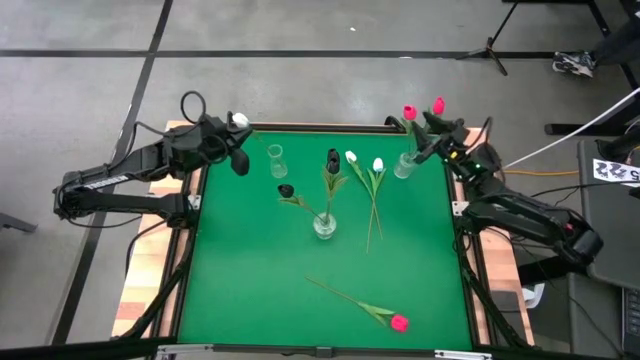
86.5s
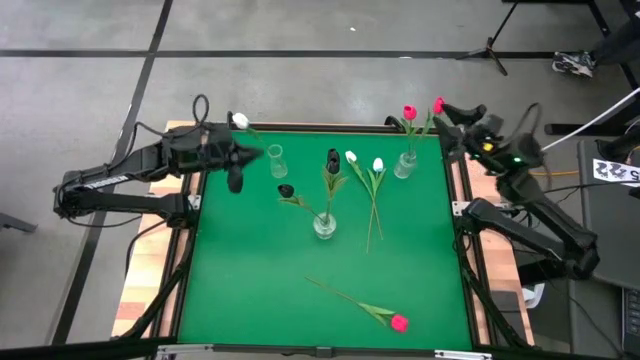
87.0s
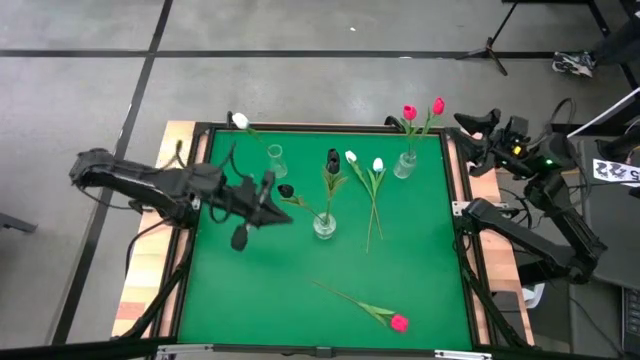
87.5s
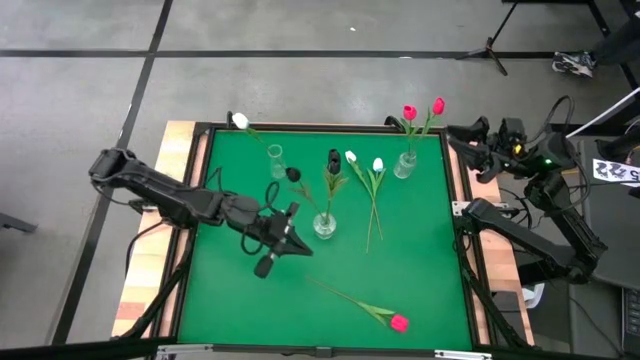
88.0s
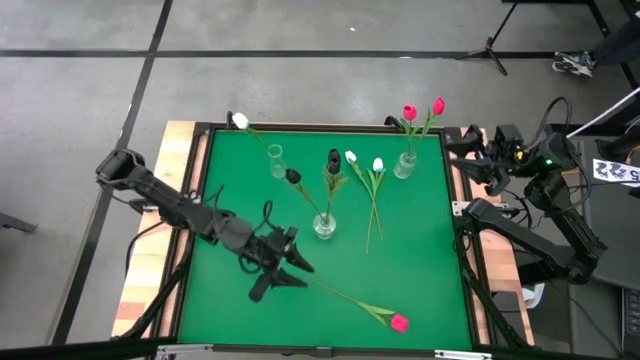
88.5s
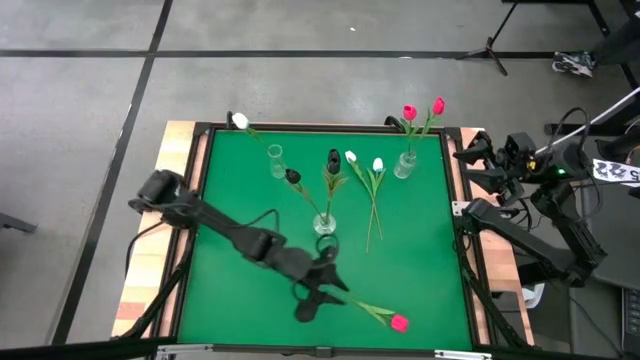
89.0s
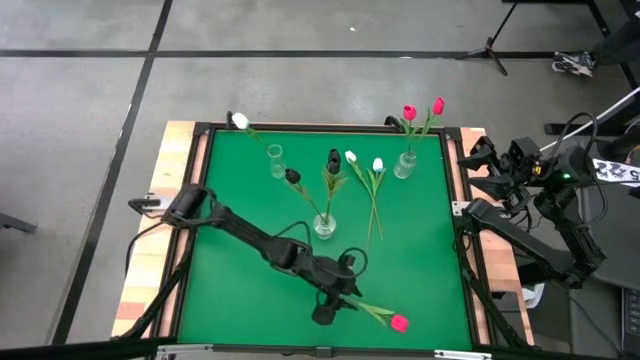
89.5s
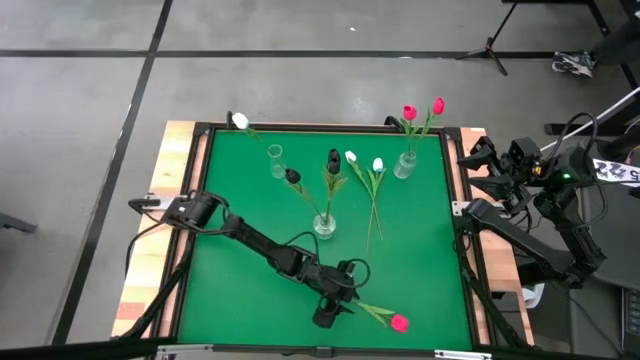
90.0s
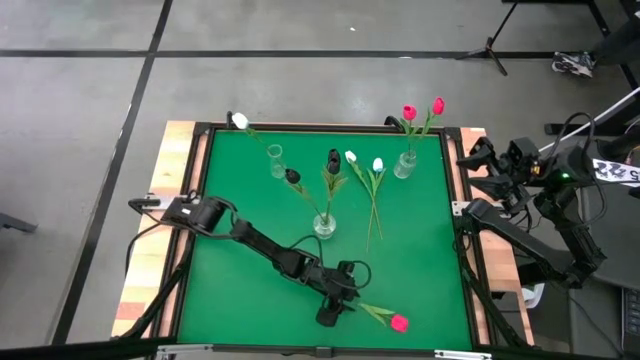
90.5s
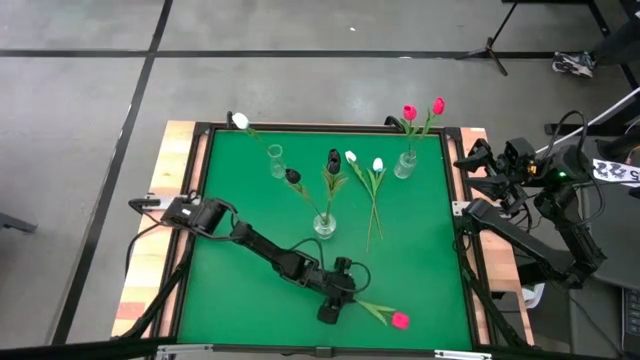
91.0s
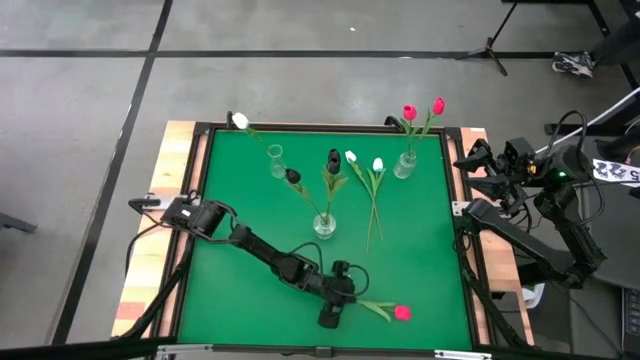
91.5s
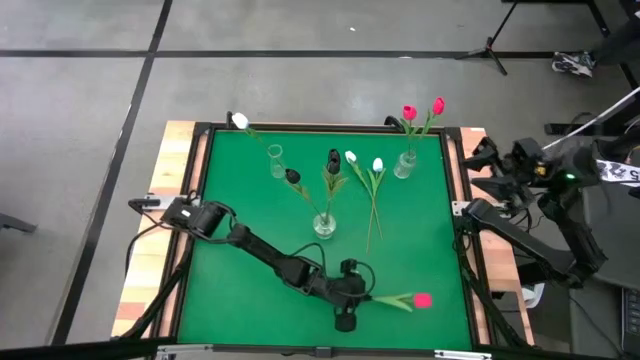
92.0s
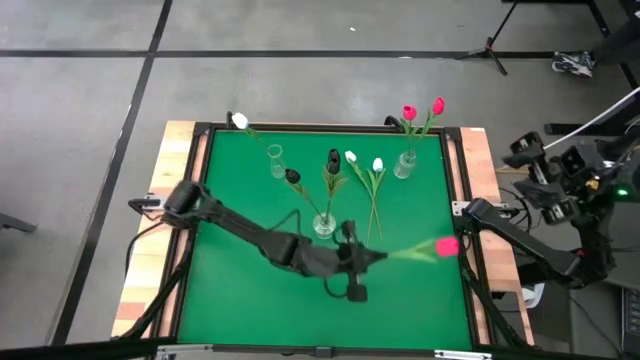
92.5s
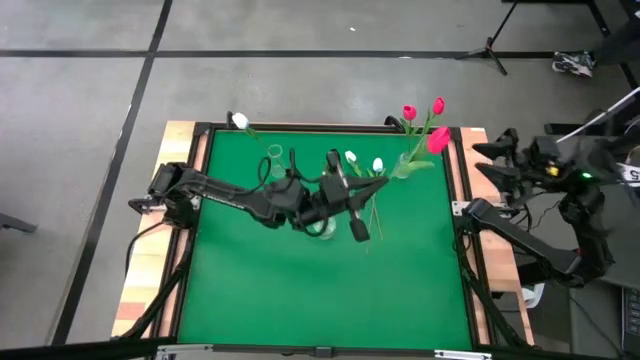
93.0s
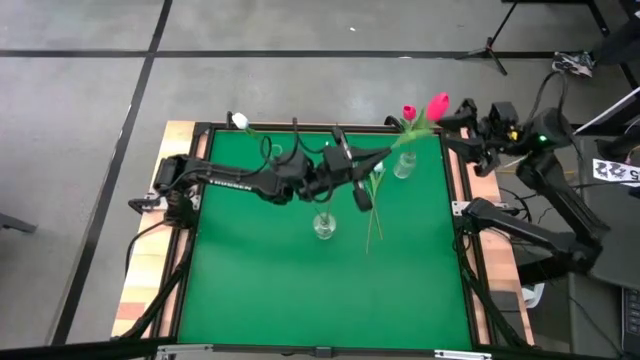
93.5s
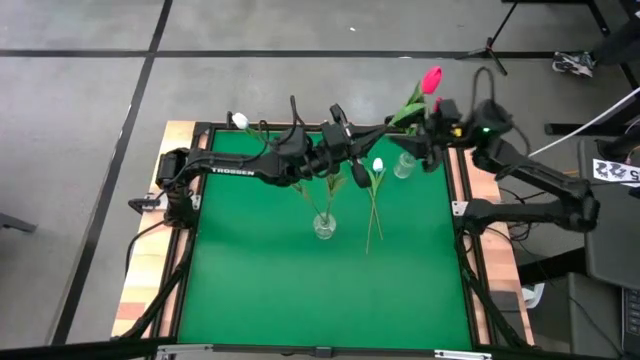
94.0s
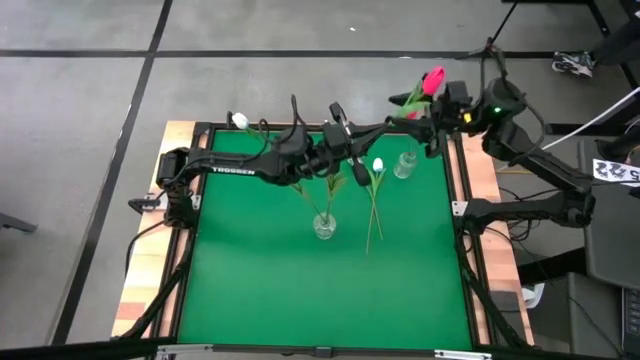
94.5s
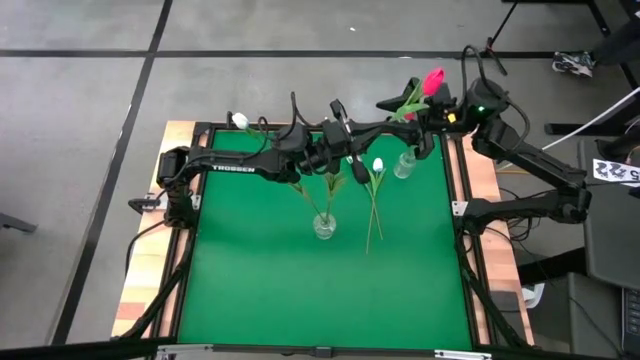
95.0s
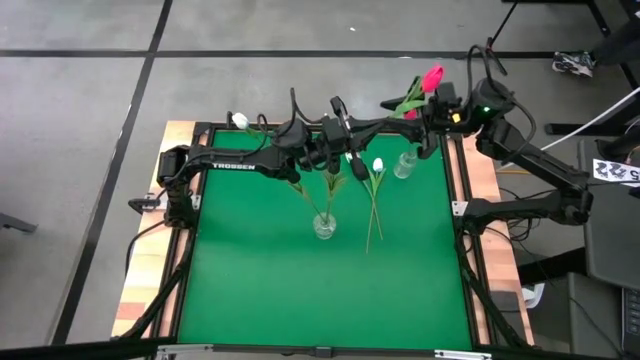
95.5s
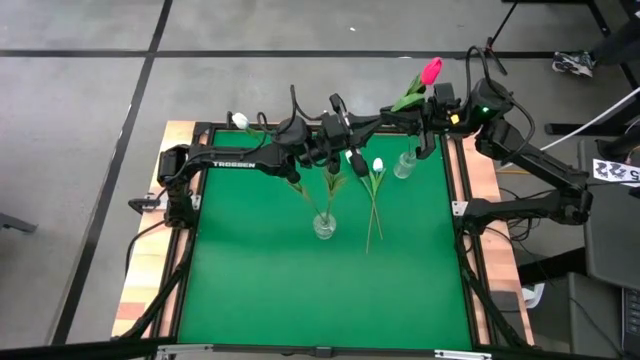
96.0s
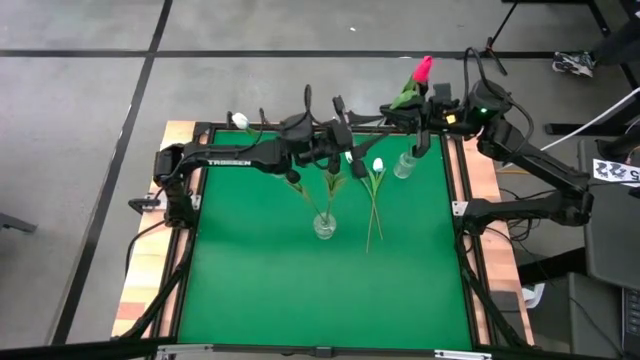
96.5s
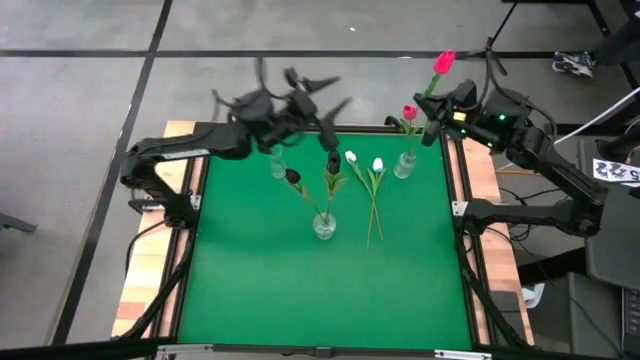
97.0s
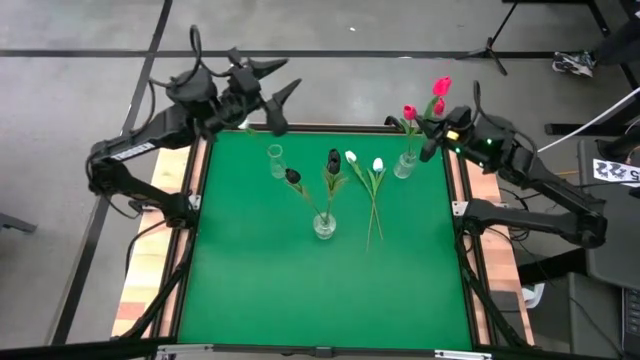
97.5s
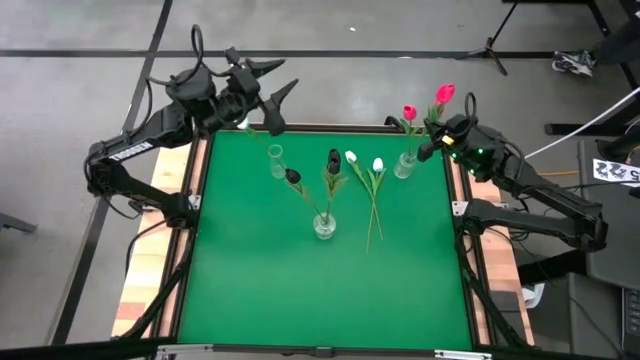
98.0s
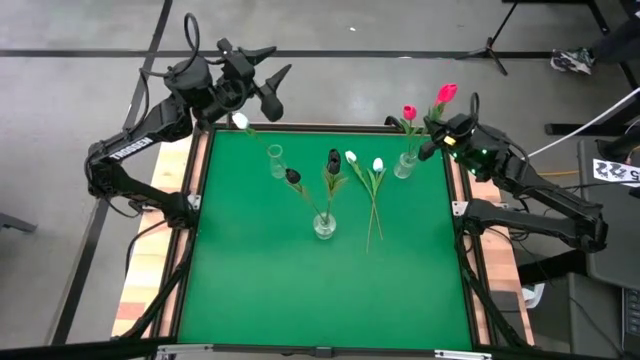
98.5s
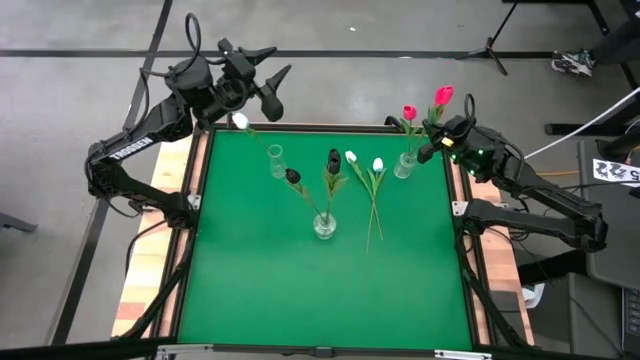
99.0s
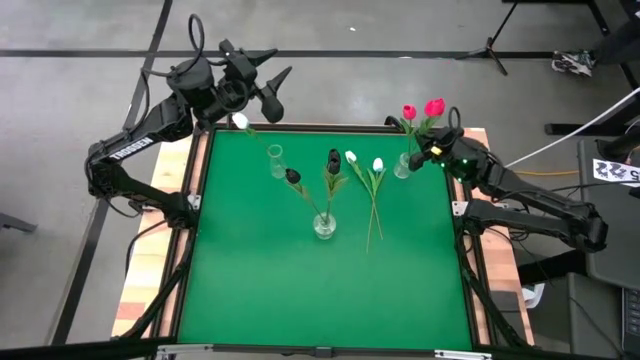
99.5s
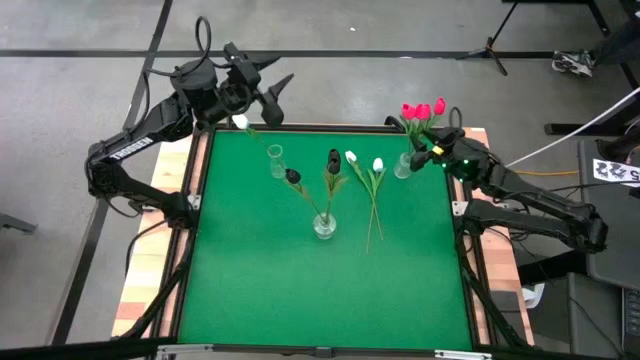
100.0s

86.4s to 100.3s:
Task: Sort flowers into vase by color
Put the pink tulip into the top right transparent vase

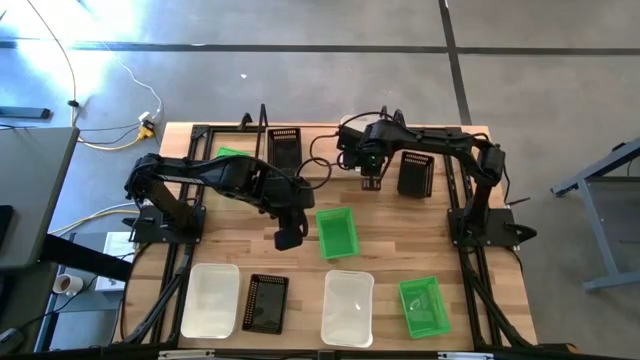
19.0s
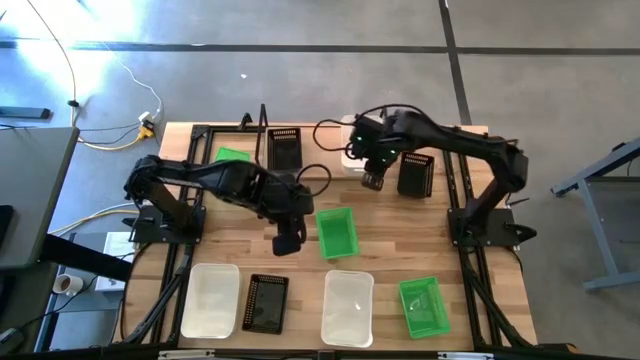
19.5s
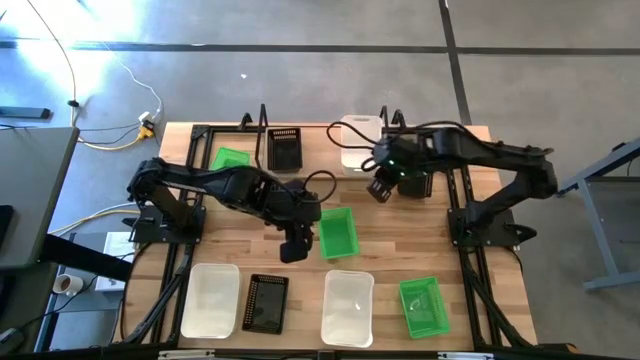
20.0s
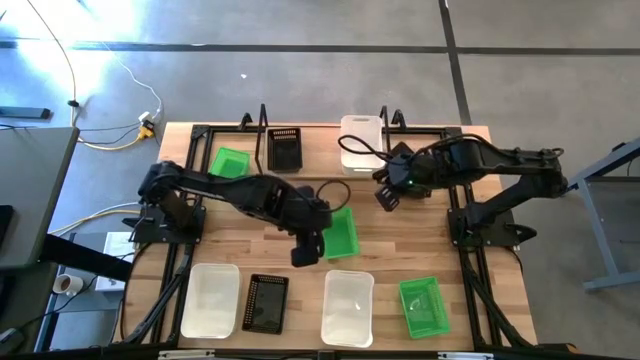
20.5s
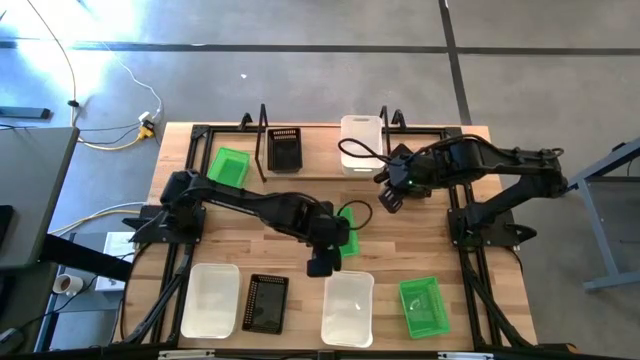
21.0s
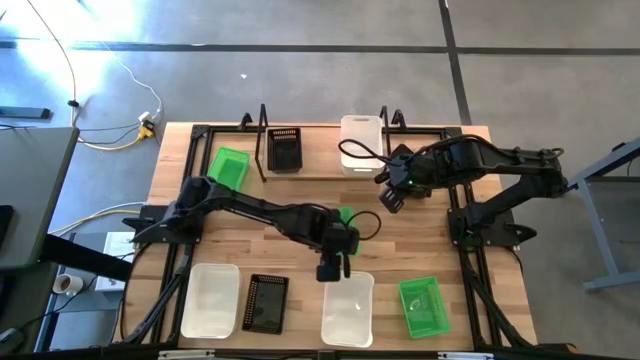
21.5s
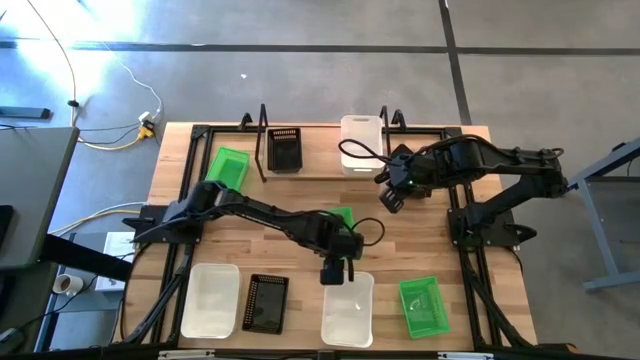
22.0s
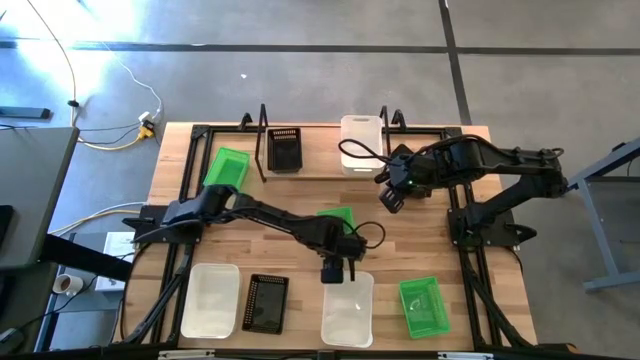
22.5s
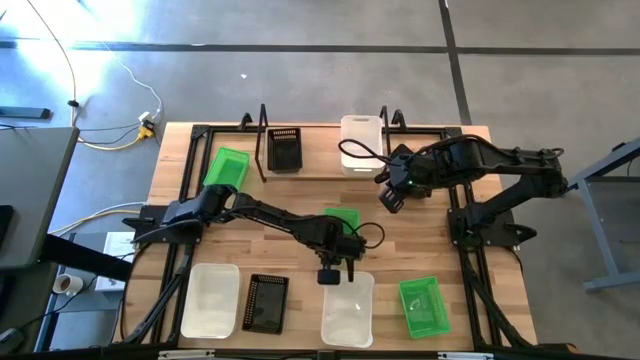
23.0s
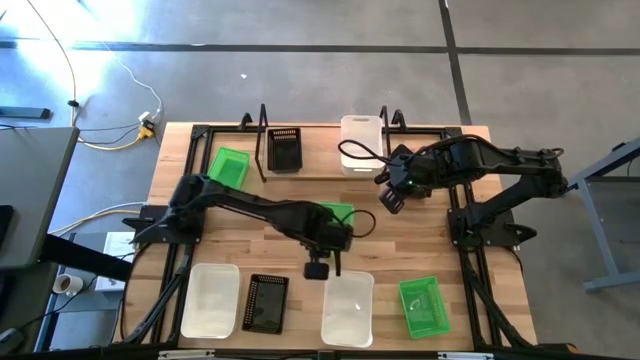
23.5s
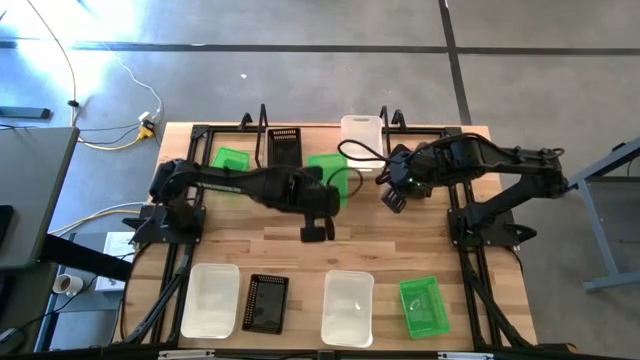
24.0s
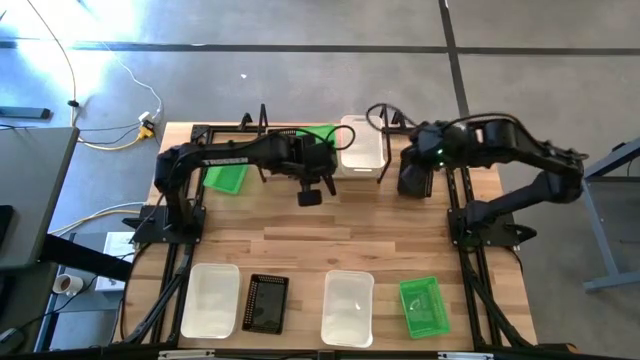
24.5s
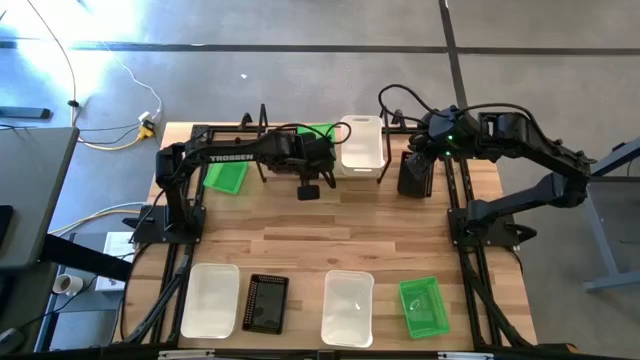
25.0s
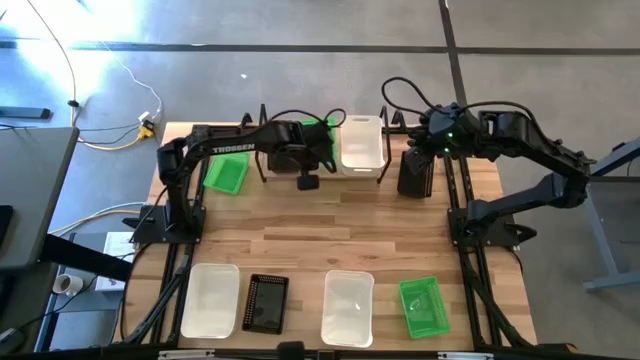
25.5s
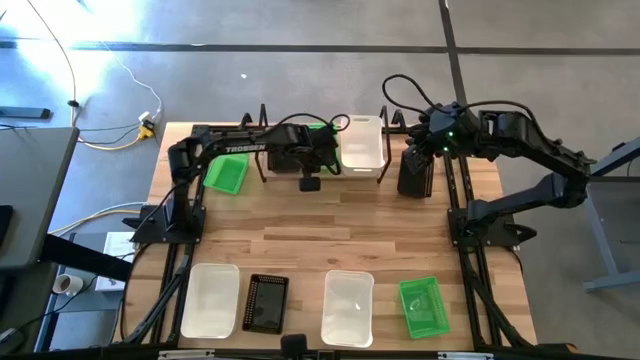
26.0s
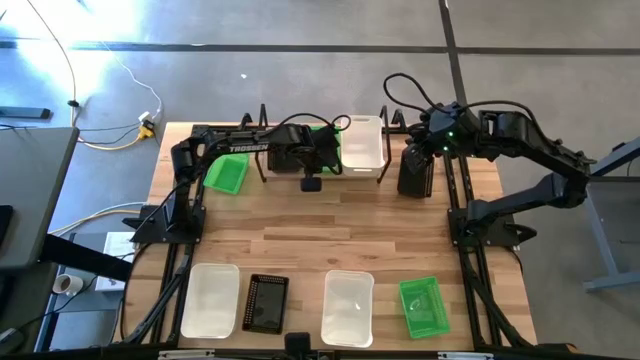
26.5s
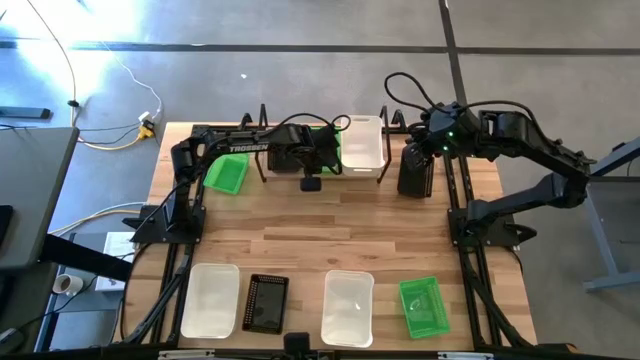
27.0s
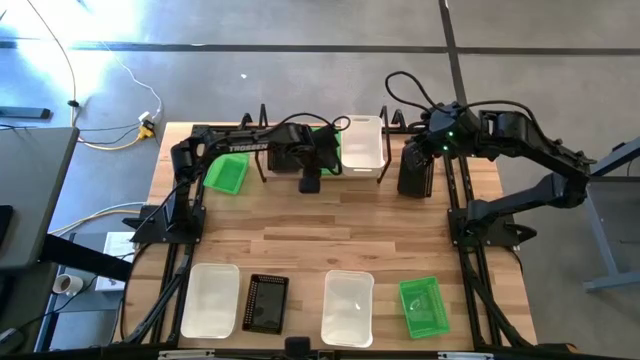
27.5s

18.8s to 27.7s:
Task: Stack baskets on shelf by color
Put the middle green bin on the shelf
